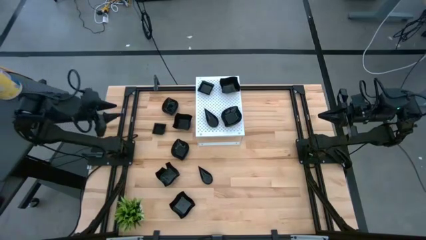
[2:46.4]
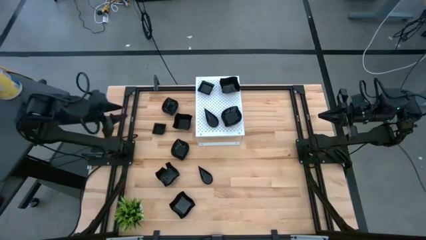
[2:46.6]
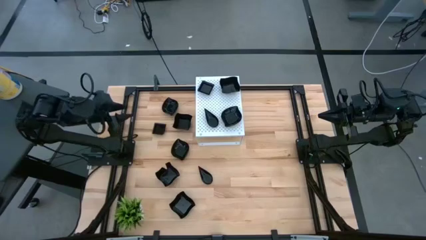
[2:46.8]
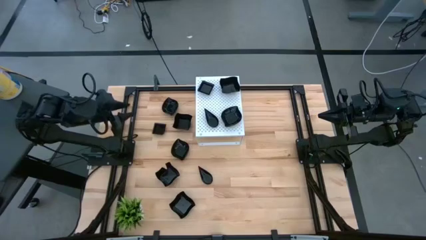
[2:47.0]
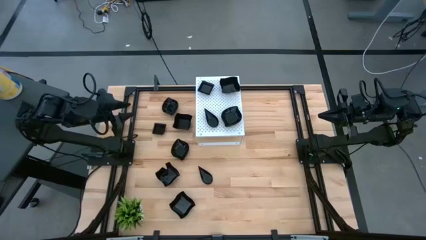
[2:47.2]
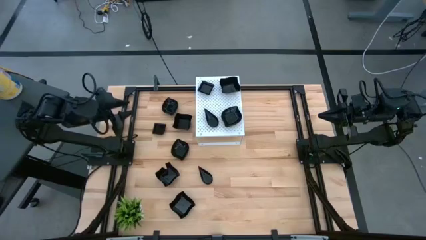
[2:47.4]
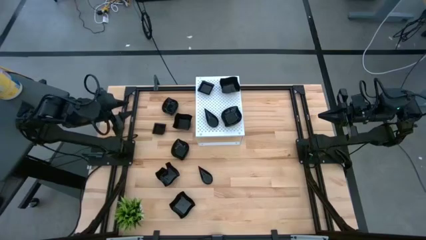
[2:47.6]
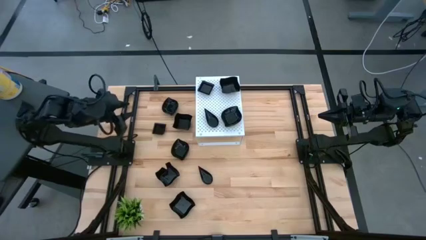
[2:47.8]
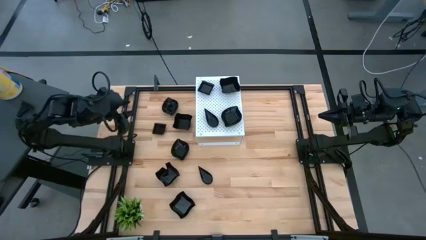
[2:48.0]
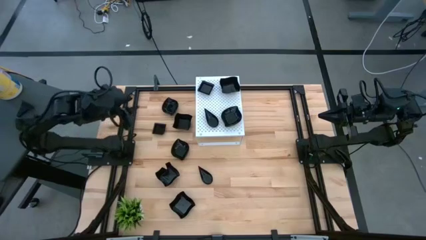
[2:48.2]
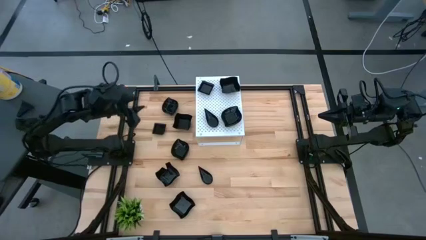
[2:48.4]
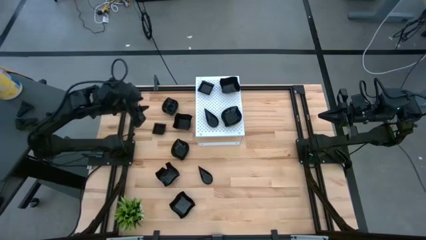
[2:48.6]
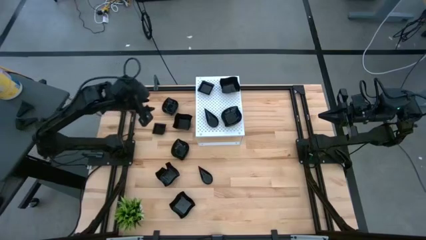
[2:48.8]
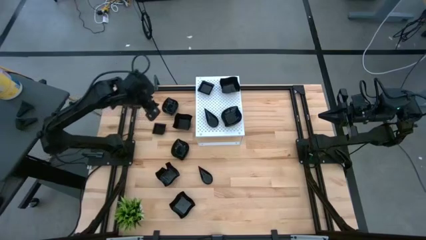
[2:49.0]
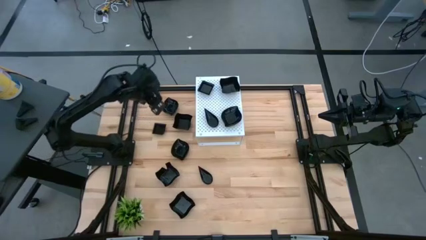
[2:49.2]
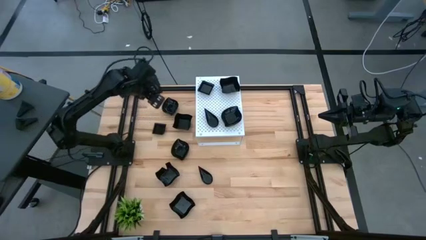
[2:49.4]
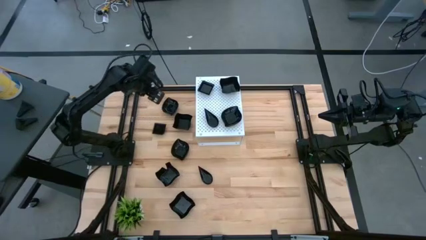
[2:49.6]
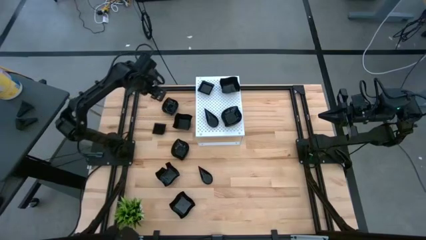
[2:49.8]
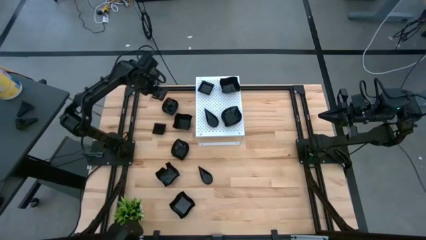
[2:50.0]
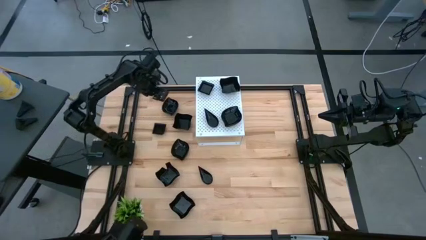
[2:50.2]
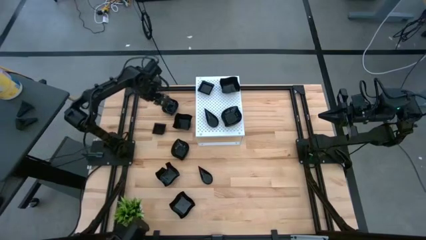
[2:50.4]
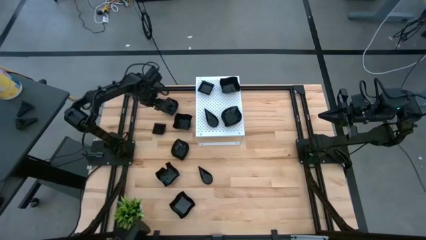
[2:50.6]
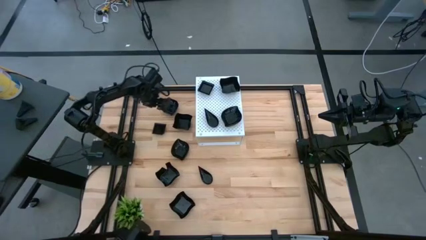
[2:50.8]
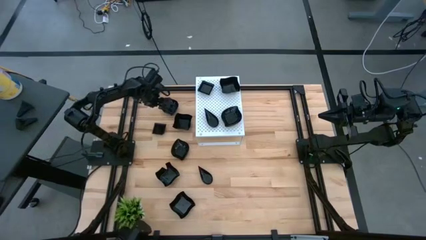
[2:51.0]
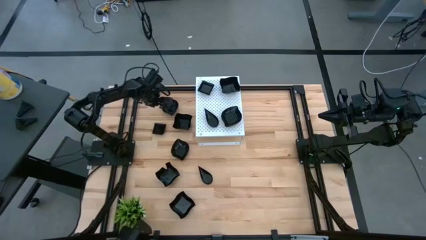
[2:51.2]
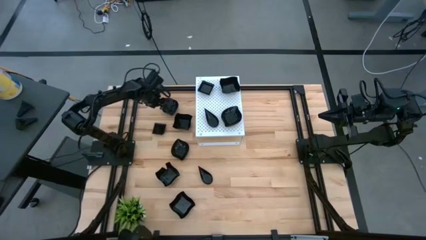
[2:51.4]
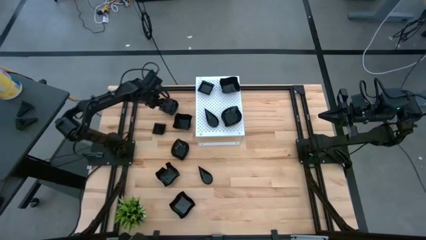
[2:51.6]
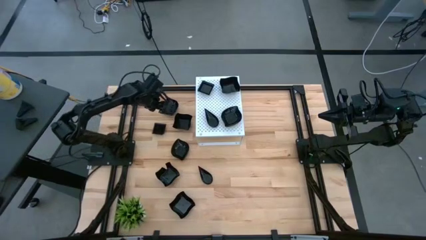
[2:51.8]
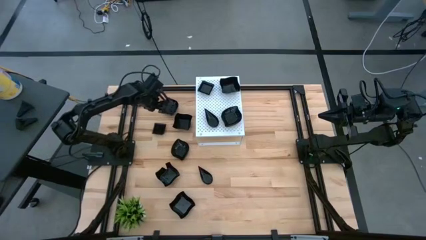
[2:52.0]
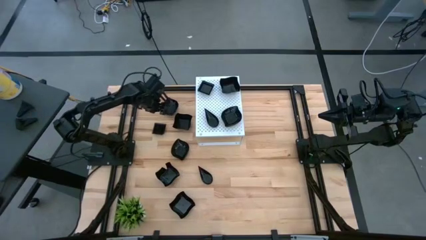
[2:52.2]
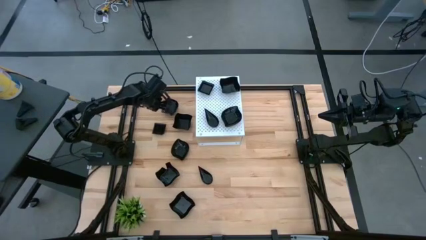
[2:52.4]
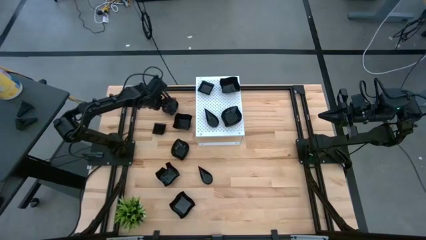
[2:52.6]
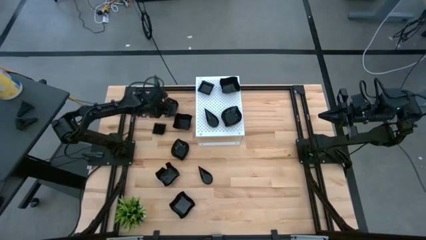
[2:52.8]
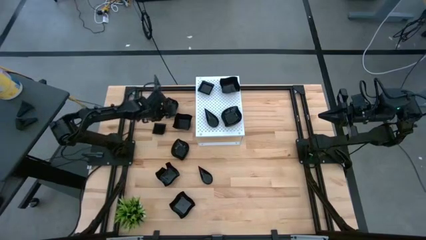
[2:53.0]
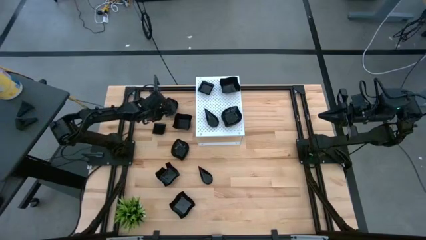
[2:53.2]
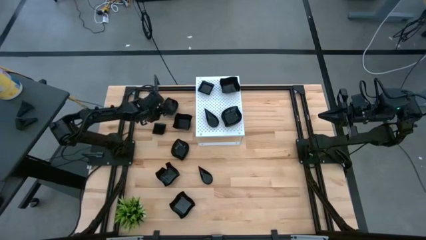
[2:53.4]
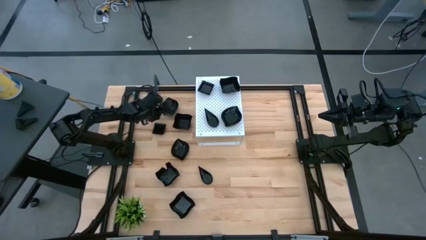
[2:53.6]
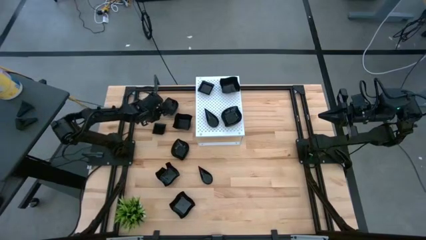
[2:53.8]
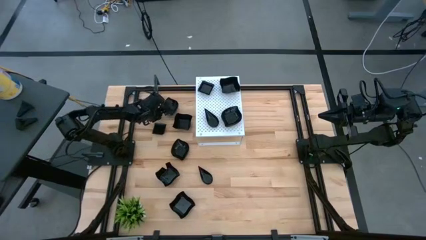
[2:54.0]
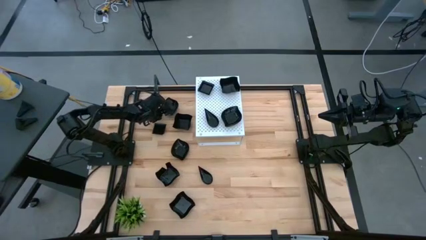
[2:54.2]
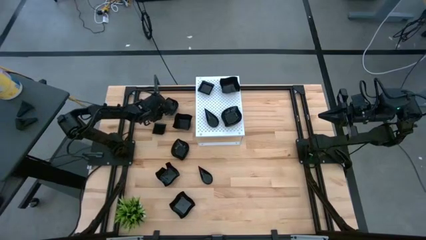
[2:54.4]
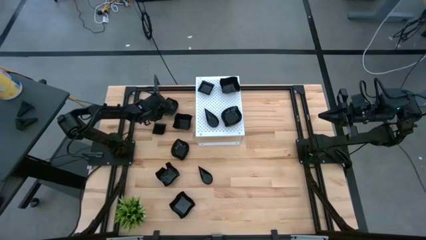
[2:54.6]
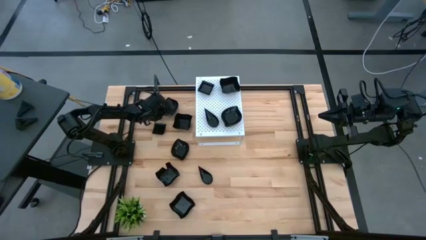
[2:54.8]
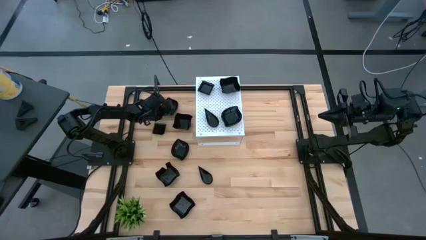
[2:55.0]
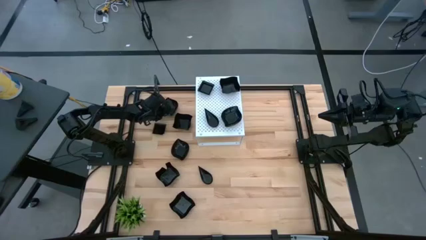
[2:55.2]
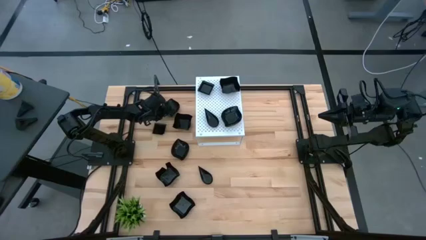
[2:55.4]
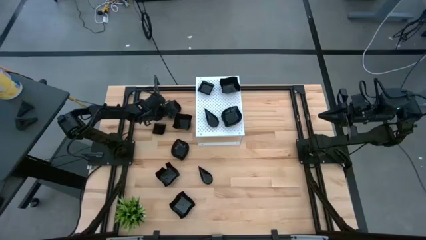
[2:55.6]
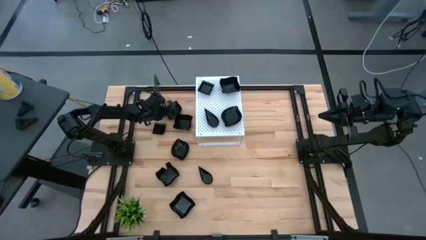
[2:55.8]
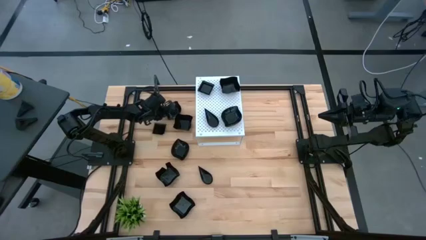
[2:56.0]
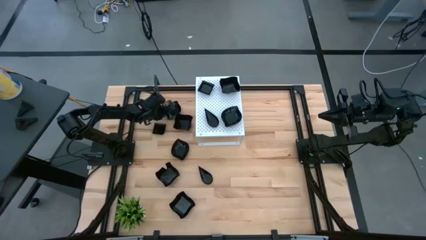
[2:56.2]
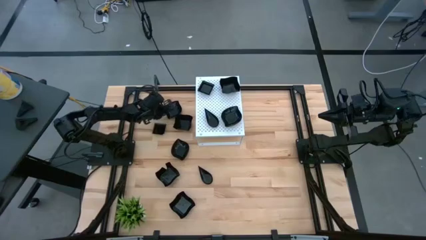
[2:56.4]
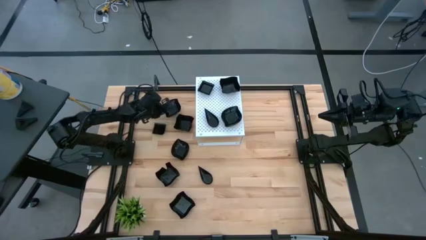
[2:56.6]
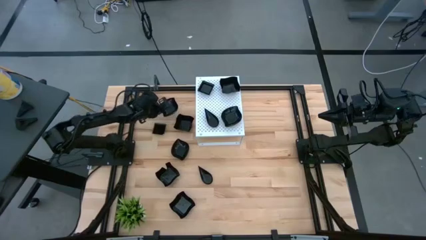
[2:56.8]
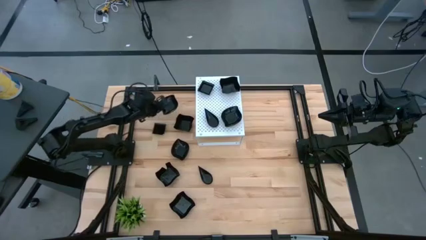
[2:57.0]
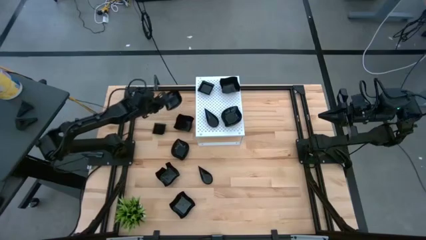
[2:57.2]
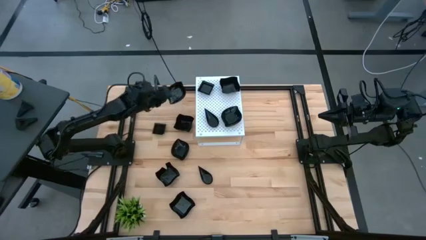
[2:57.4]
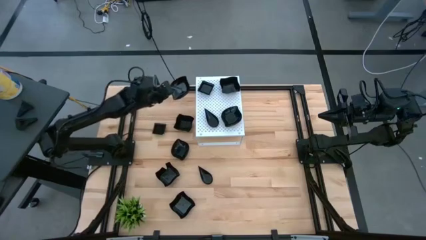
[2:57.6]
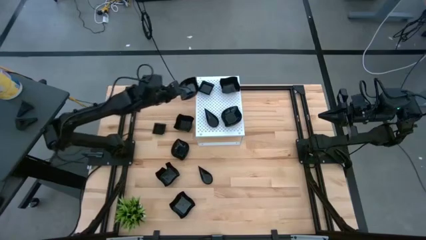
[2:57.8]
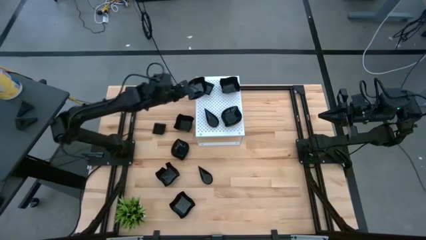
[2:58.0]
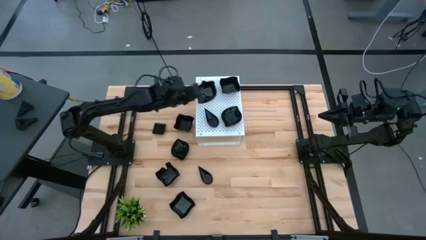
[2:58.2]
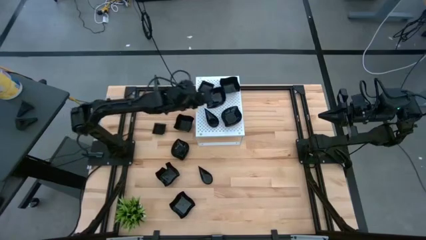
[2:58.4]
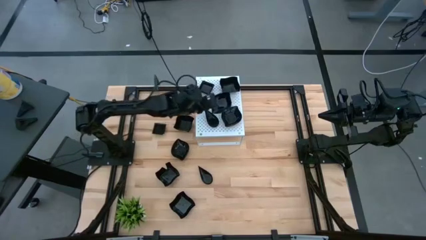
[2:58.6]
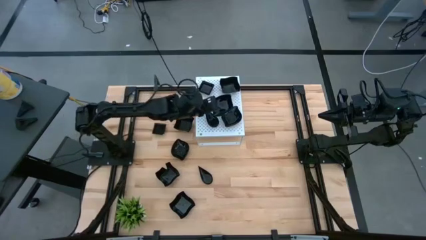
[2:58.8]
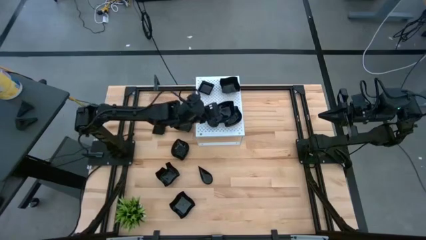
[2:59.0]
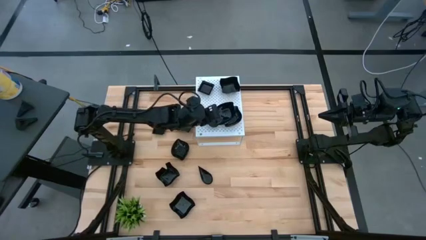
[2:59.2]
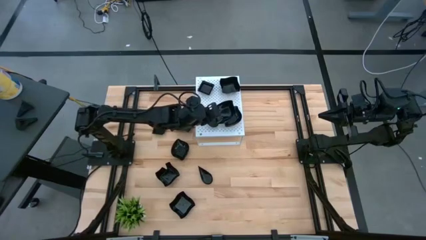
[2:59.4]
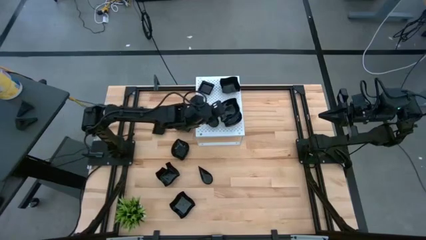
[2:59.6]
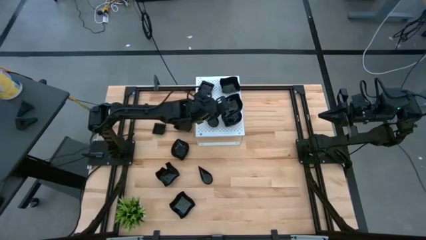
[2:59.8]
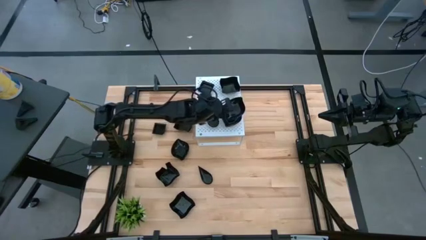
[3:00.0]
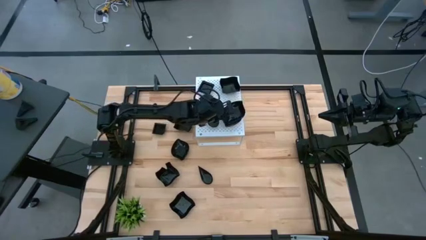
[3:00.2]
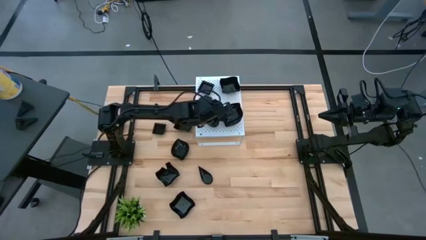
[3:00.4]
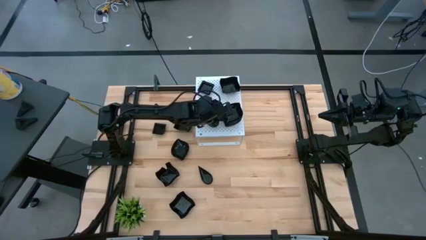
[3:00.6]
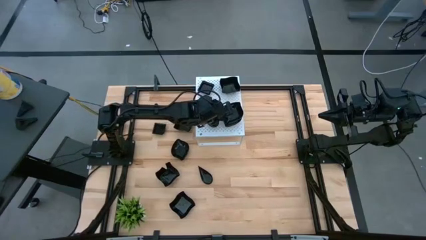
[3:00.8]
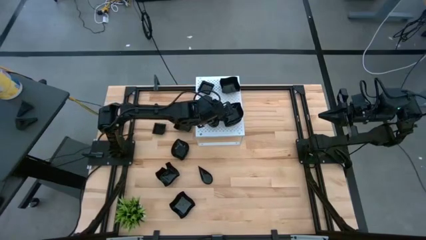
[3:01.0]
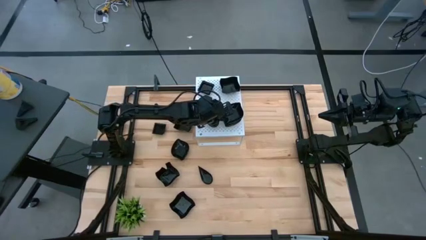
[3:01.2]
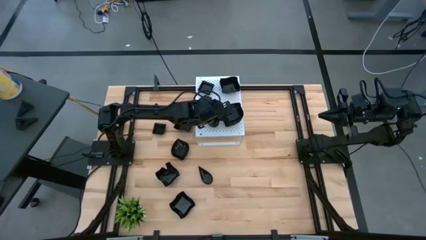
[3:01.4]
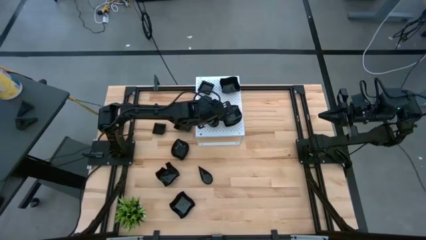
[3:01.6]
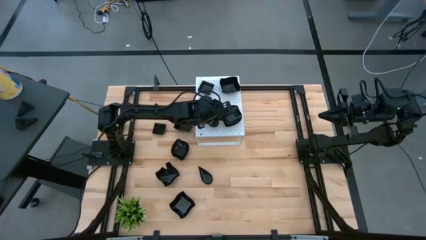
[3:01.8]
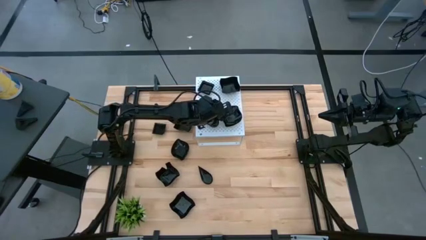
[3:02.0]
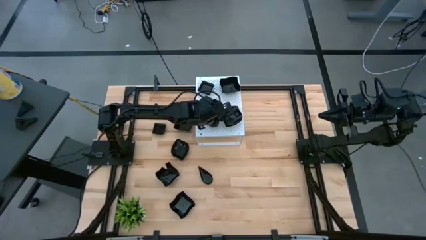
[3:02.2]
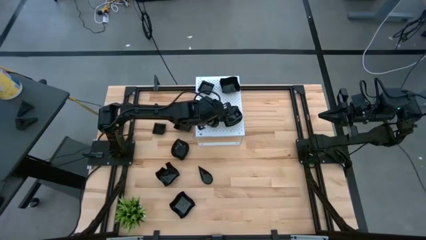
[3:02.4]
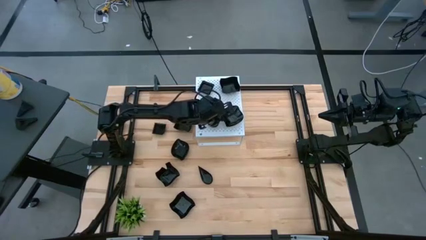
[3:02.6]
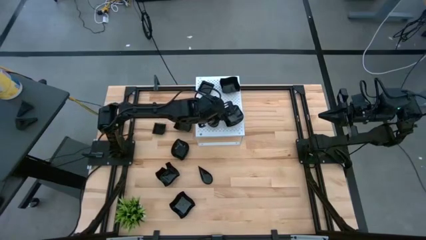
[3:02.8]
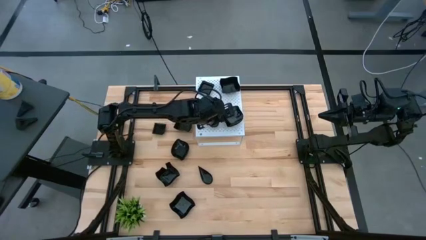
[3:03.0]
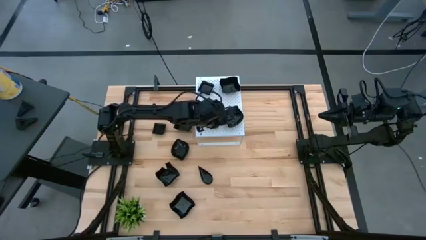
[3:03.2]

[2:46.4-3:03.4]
Task: Pick & Place Mini shaped plates
Stack the leaf-shaped plate on top of the leaf-shaped plate on the shelf
